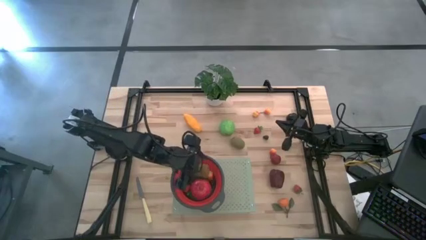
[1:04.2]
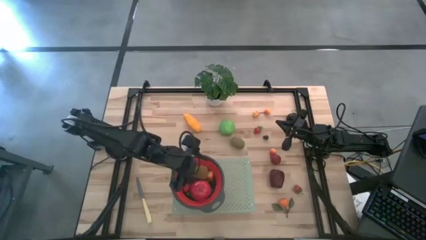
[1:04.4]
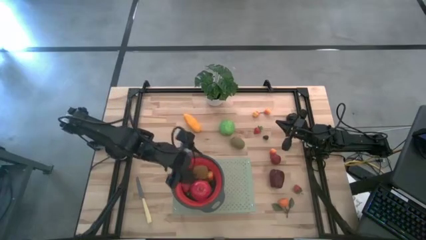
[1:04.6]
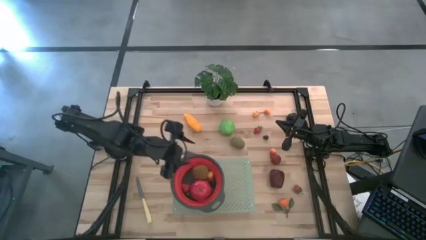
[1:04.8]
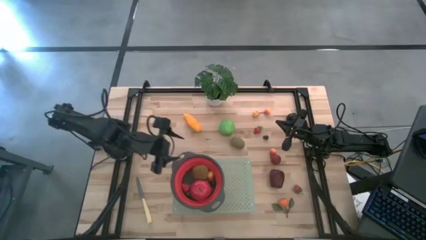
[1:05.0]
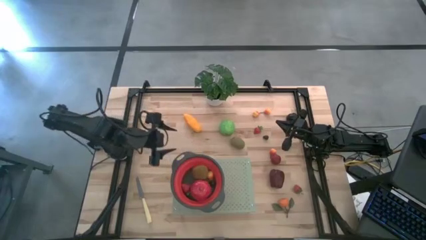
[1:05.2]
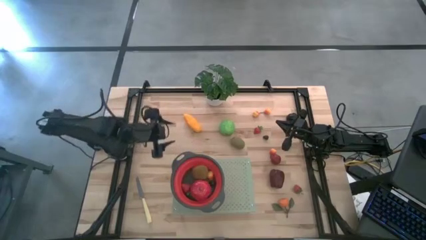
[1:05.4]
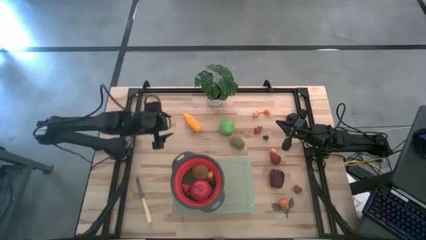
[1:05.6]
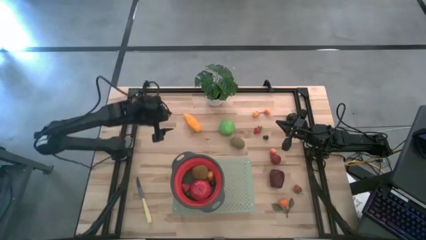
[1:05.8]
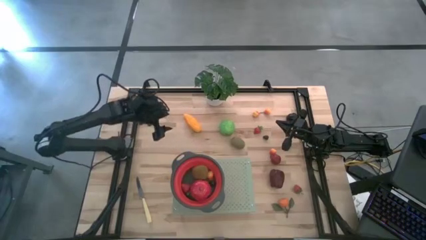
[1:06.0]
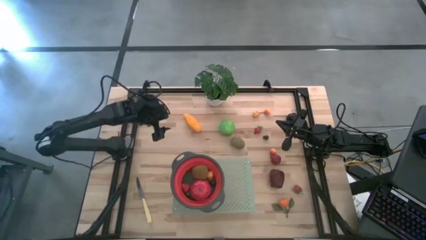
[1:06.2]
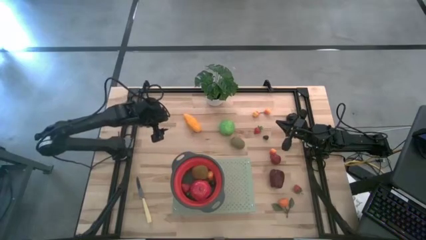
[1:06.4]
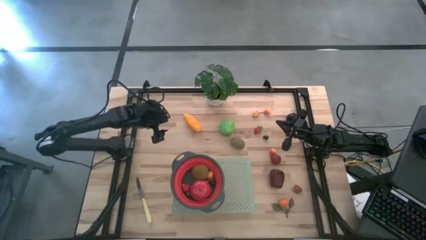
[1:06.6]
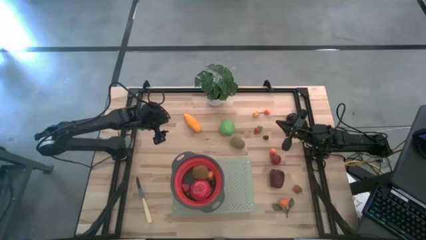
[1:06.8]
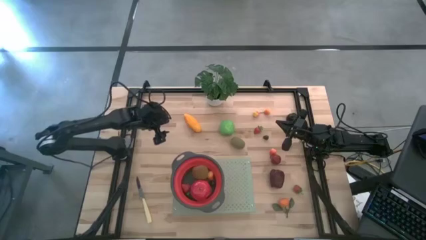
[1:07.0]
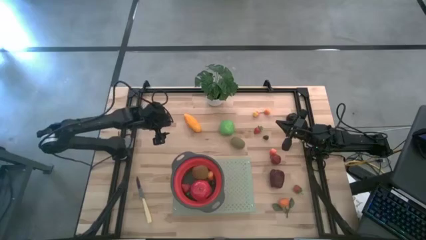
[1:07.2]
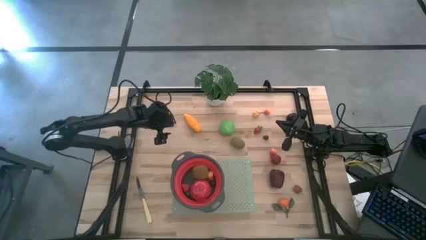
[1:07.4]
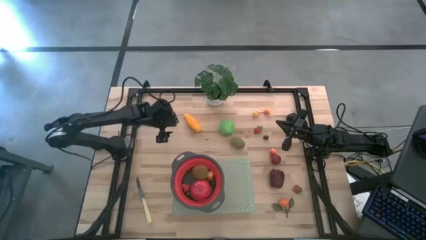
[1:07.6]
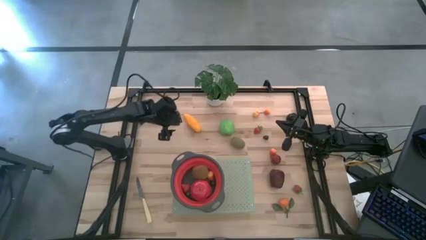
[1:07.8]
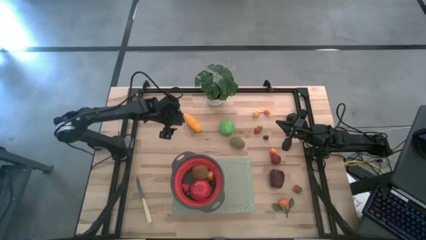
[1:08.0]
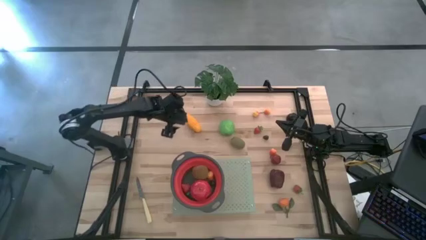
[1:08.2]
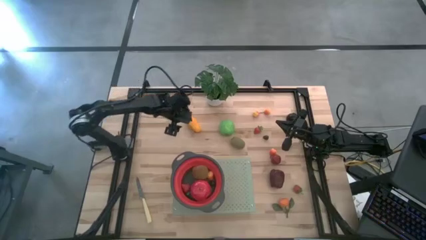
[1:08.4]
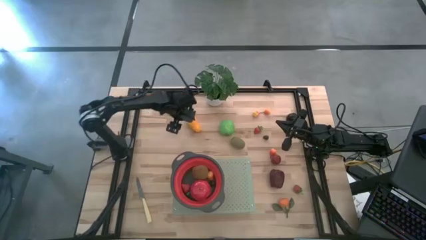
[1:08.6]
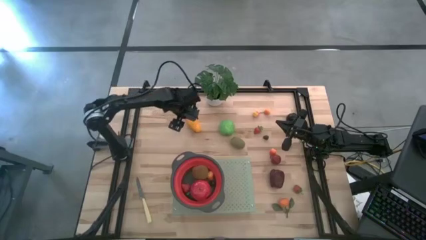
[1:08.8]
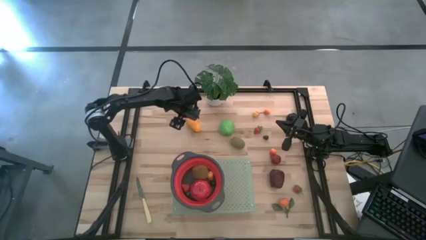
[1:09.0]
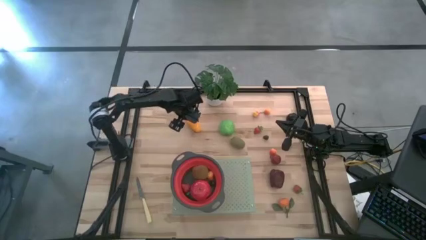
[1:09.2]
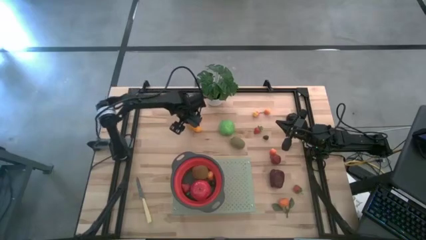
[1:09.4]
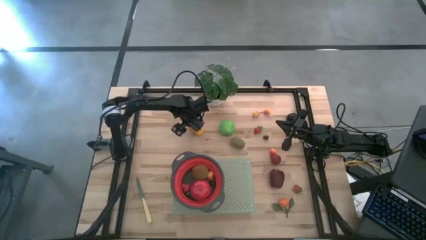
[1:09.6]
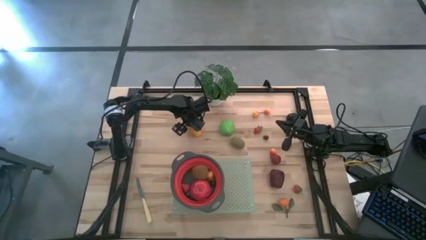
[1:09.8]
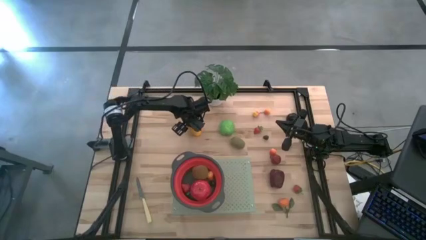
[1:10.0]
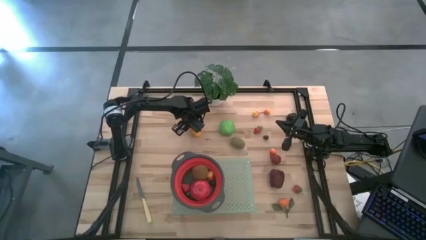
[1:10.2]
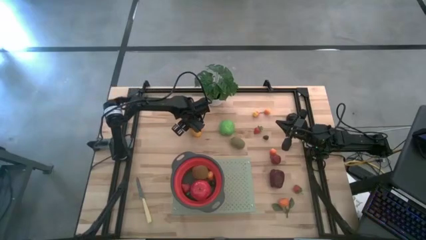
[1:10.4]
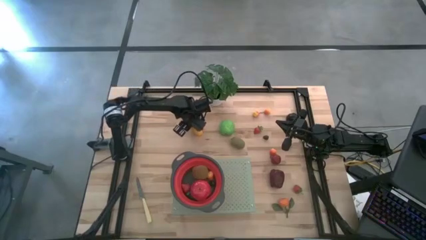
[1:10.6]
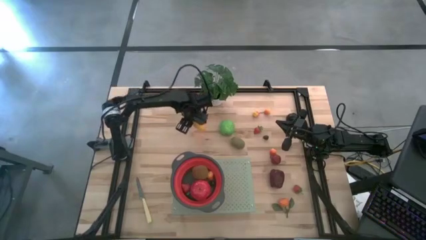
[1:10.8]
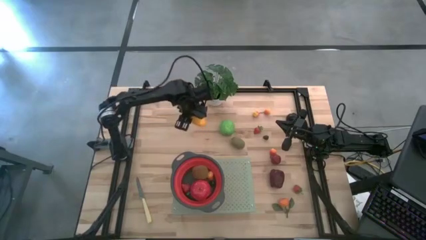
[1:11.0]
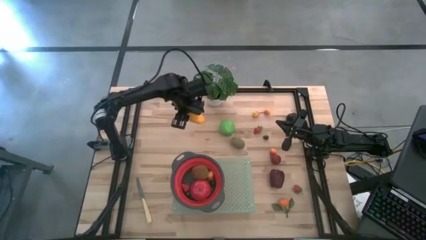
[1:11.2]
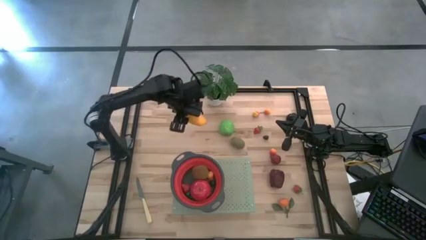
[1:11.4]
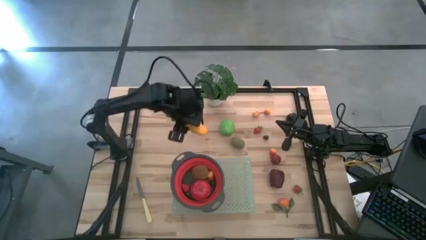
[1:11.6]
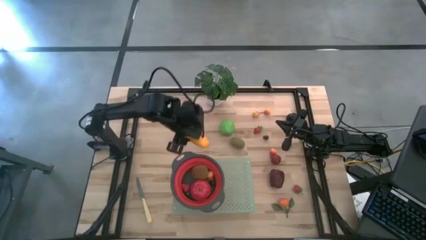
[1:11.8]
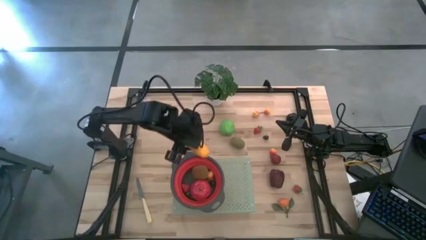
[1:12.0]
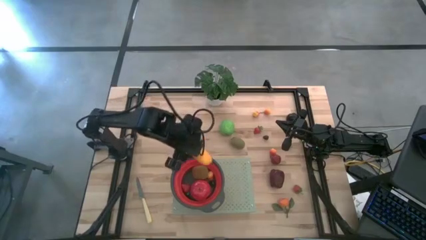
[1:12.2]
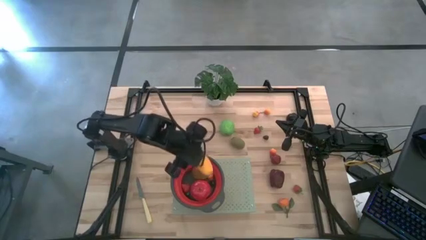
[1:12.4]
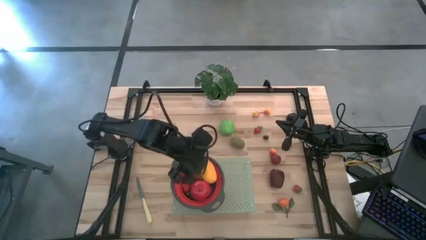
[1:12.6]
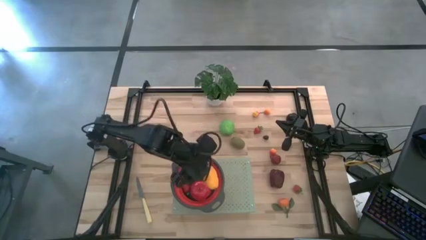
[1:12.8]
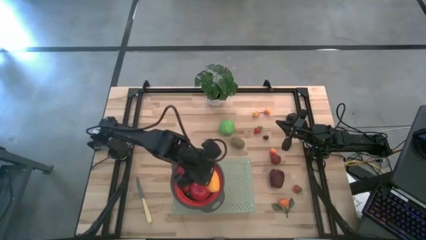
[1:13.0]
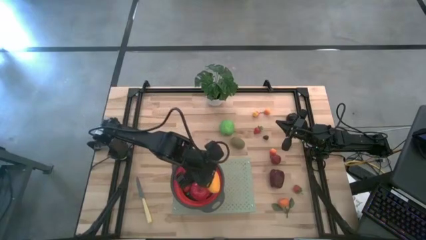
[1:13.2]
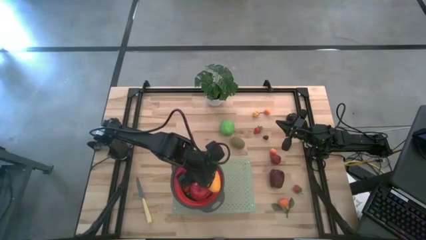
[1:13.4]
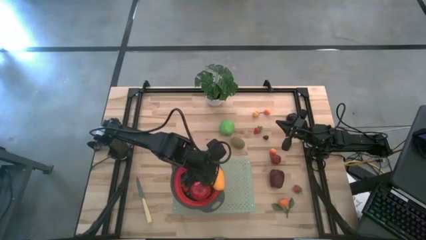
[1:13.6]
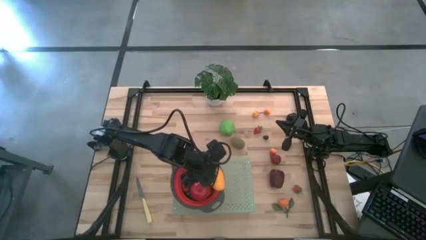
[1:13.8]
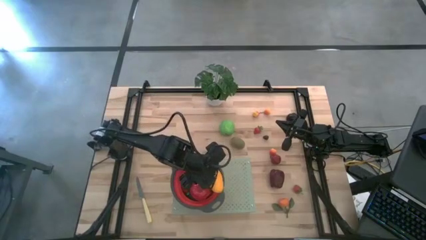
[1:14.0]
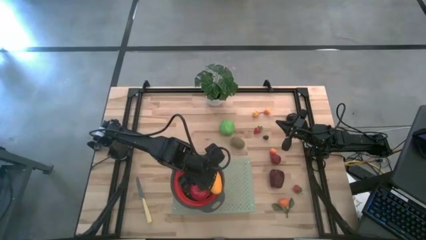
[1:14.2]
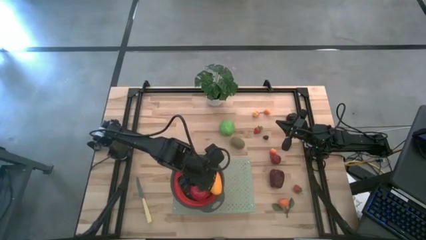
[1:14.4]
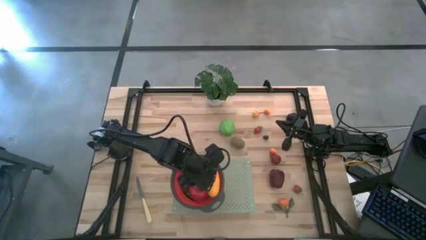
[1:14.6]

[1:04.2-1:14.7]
Task: Pick & Place Fruit
Put the mango into the red strainer

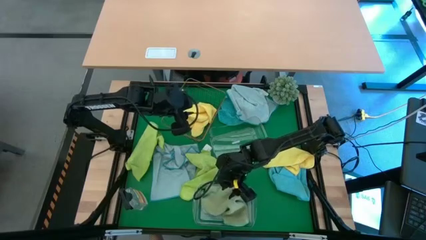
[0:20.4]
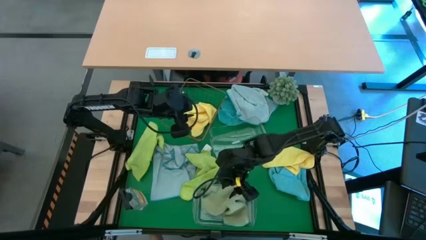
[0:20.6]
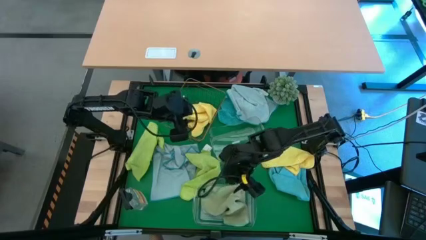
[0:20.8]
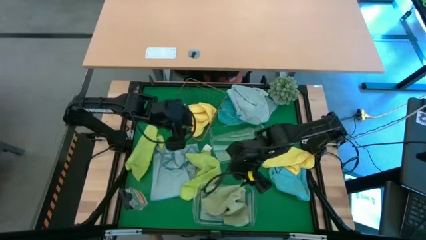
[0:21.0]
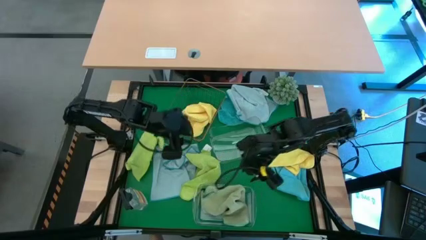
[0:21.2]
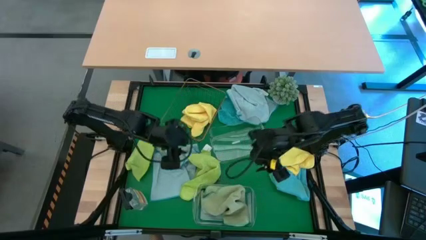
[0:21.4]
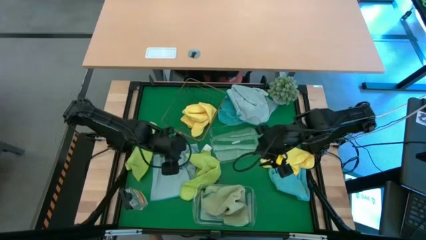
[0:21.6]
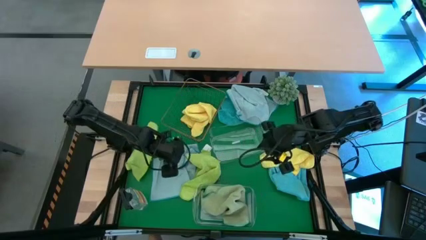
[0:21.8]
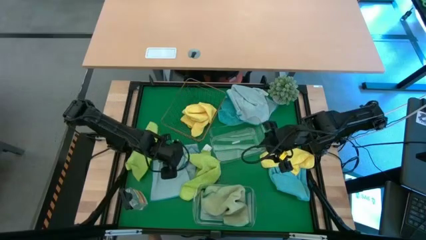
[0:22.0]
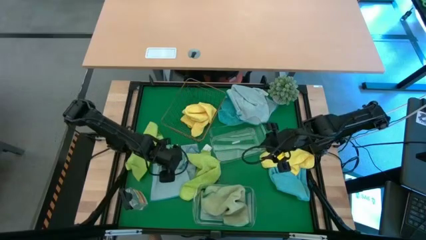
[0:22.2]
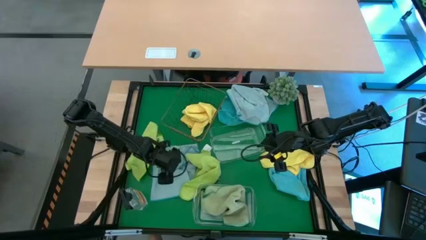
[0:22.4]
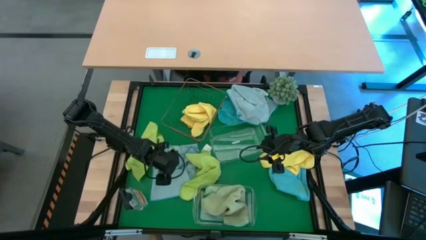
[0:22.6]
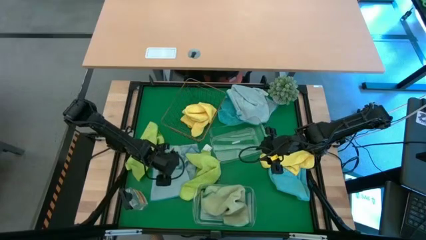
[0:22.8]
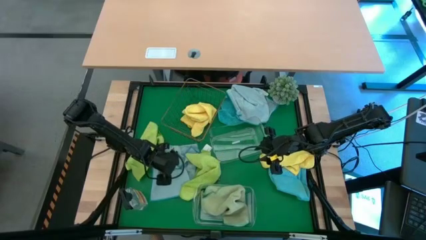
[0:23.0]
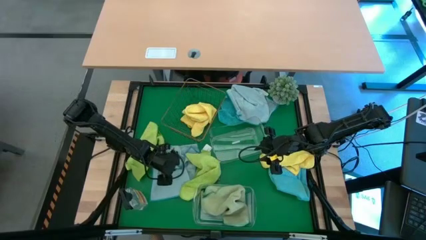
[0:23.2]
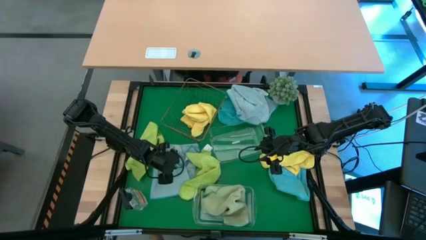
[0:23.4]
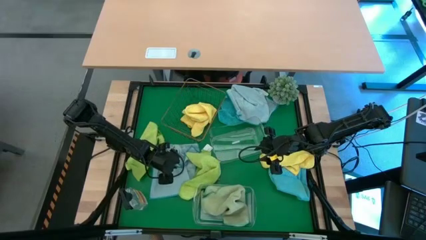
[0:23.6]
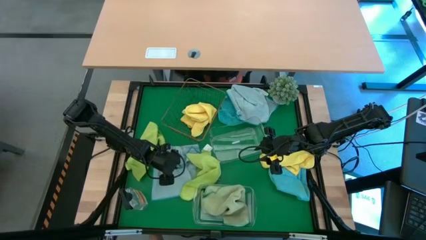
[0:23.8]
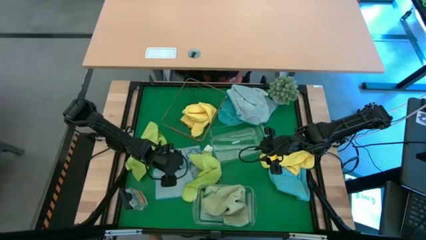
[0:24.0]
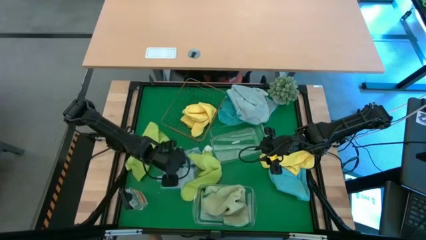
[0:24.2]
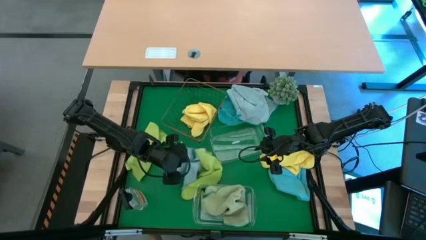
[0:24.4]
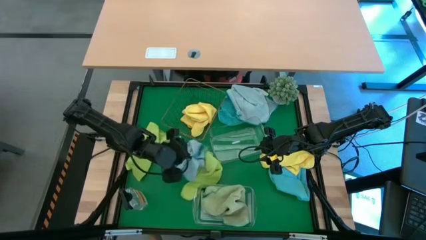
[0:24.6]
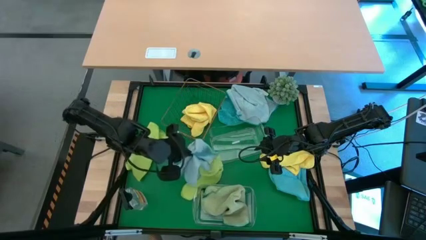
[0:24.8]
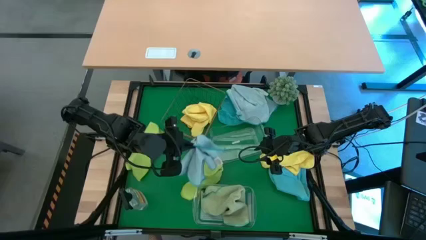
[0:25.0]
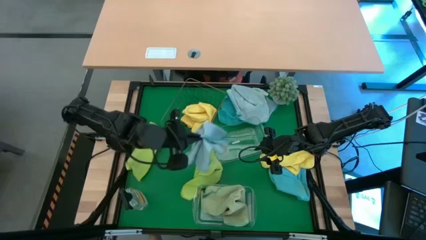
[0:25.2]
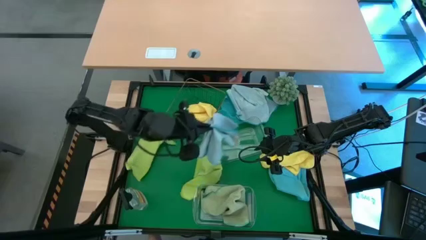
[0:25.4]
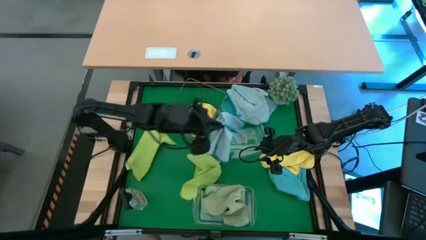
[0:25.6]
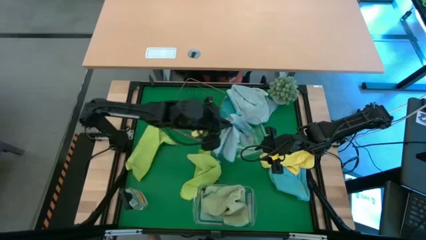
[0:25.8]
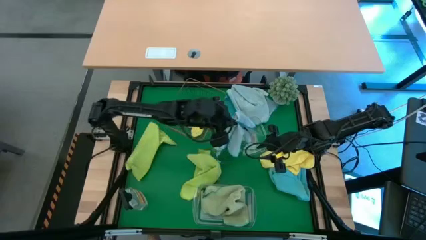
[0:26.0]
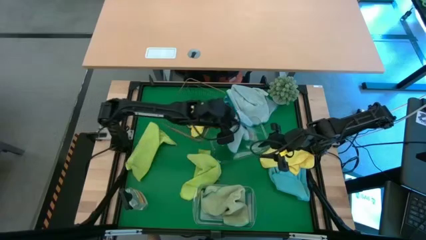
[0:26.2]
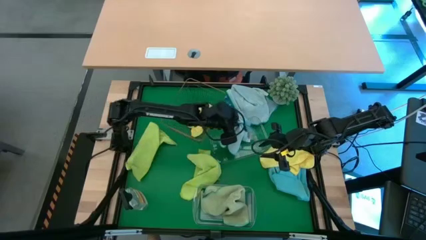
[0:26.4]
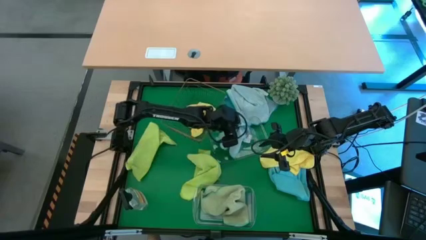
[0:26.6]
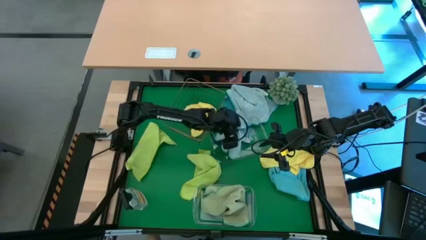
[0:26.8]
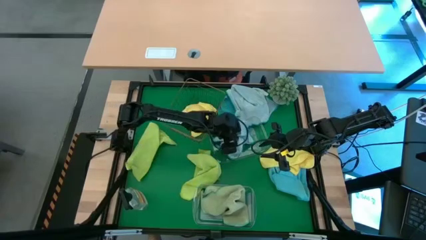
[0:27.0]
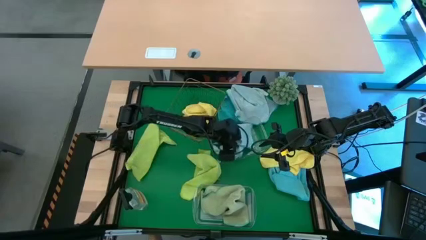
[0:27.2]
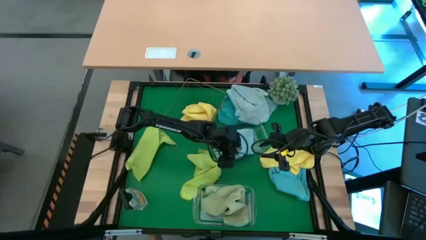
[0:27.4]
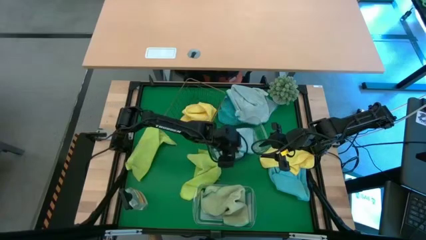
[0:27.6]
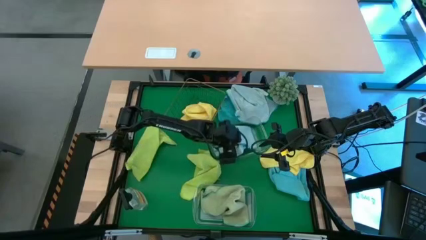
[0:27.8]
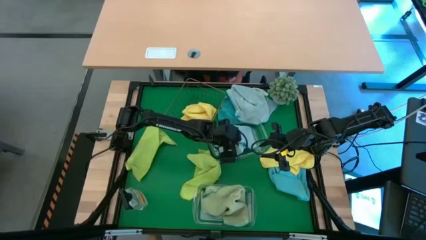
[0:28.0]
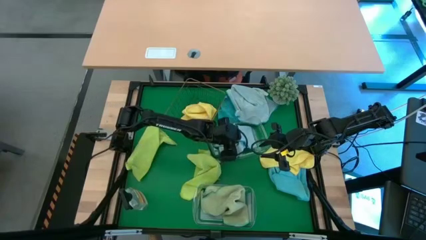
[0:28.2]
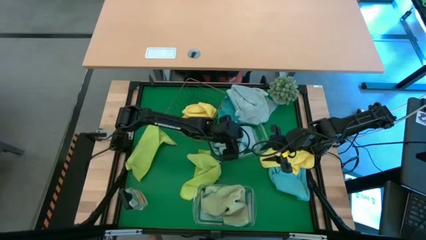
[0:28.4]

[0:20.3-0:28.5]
Task: Sort microfiber towel by color & place in baskets
Put the bottom left gray towel into the top transparent bin
